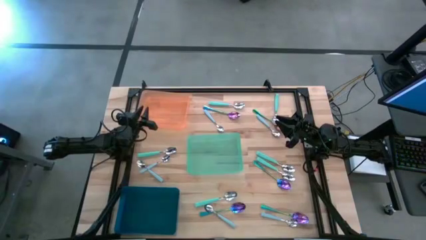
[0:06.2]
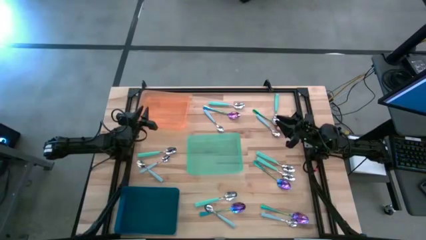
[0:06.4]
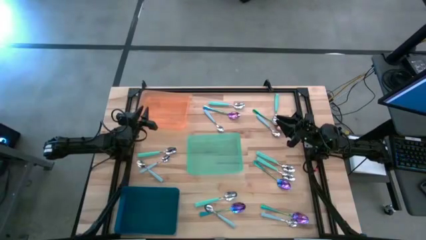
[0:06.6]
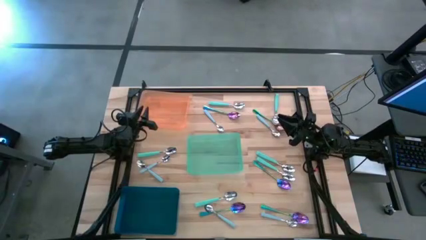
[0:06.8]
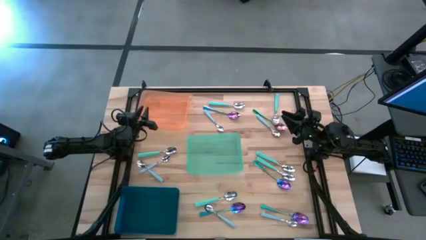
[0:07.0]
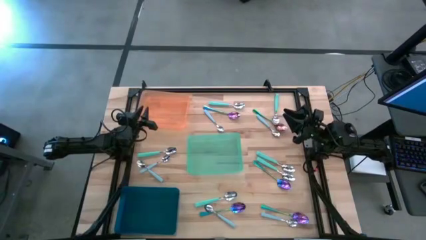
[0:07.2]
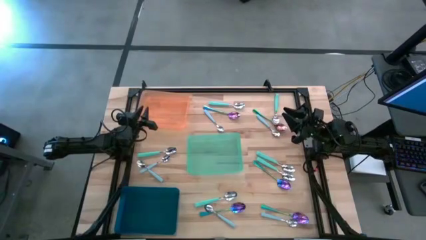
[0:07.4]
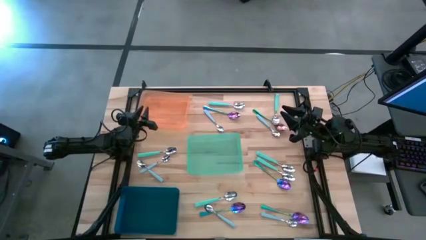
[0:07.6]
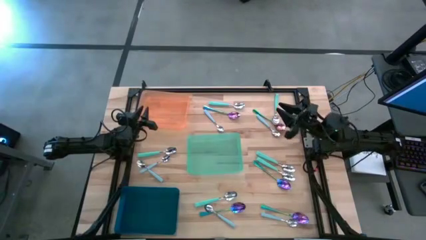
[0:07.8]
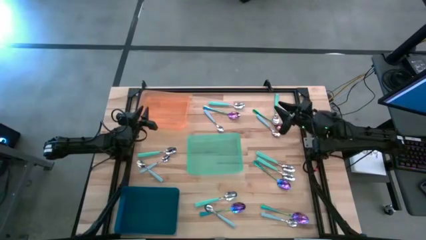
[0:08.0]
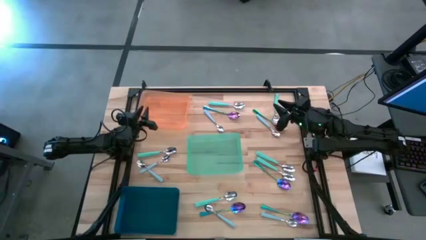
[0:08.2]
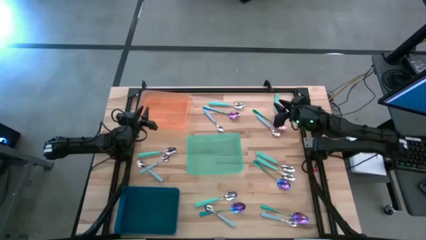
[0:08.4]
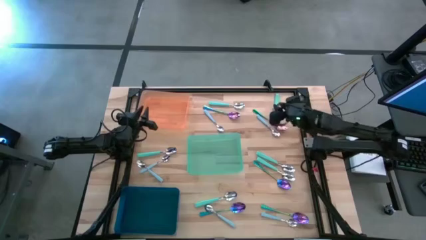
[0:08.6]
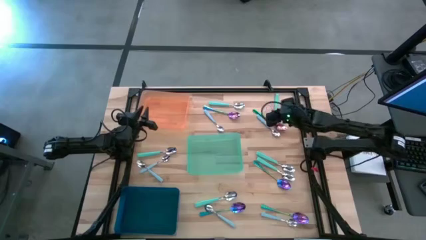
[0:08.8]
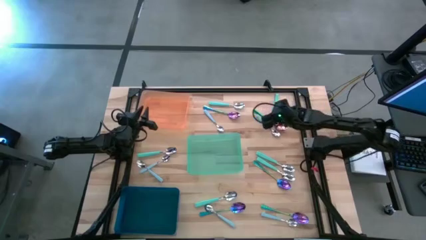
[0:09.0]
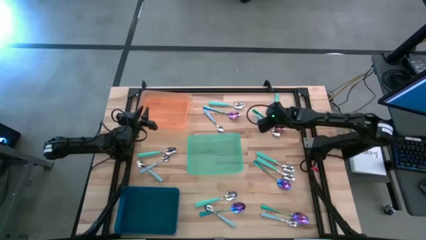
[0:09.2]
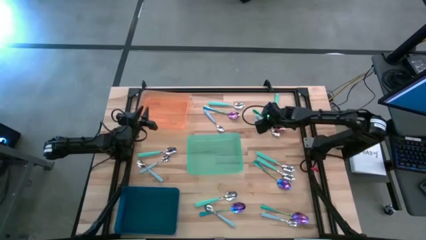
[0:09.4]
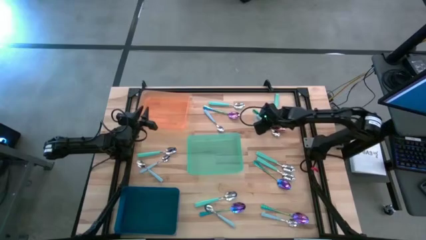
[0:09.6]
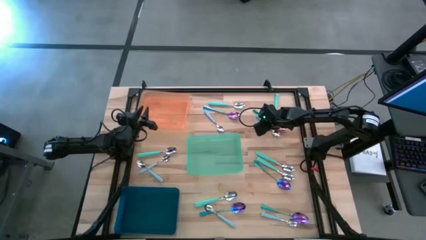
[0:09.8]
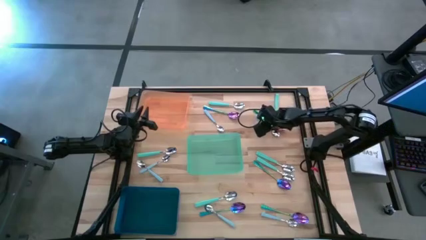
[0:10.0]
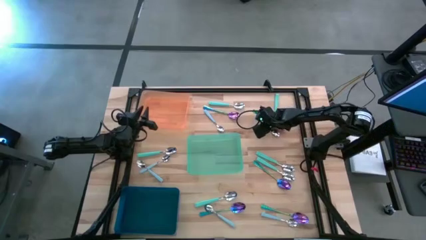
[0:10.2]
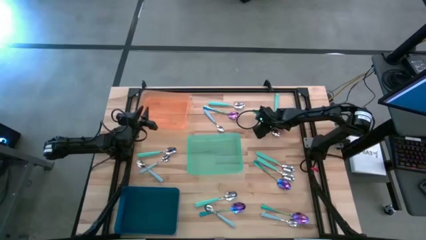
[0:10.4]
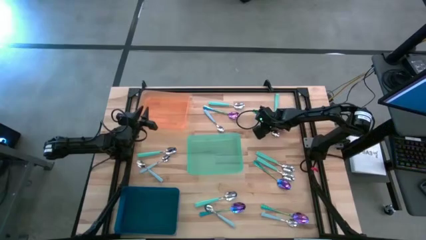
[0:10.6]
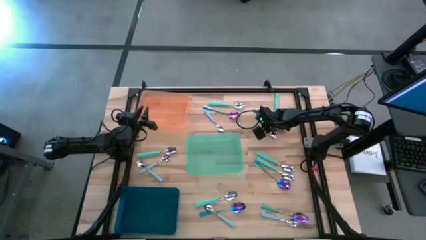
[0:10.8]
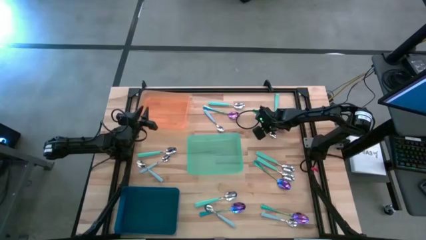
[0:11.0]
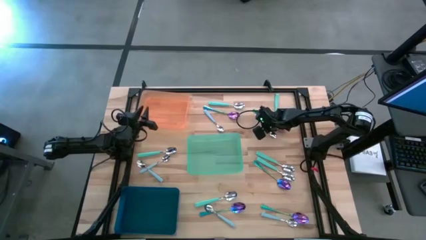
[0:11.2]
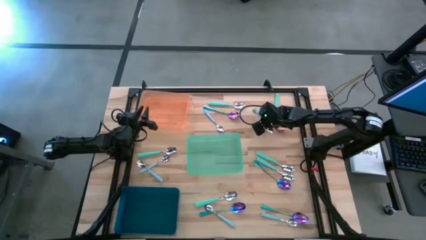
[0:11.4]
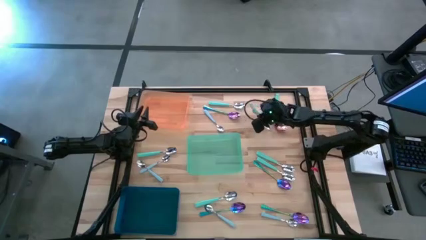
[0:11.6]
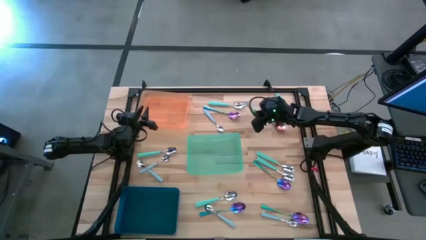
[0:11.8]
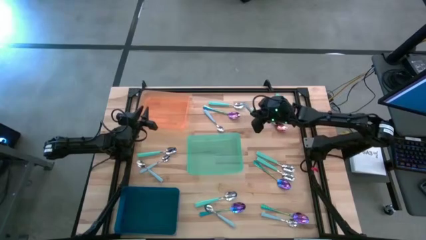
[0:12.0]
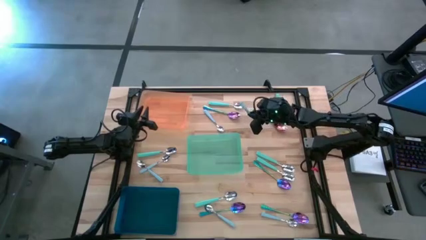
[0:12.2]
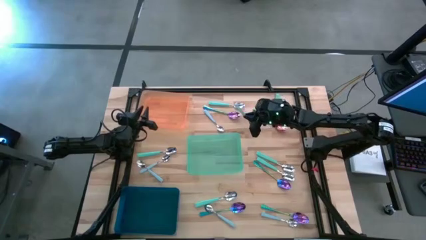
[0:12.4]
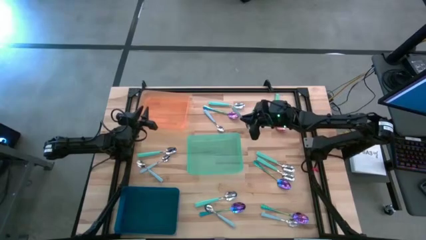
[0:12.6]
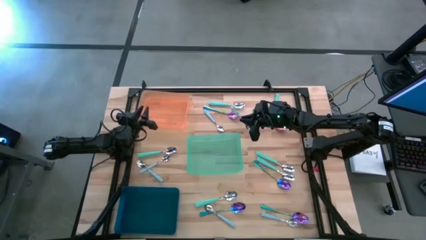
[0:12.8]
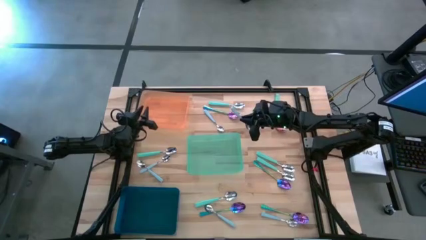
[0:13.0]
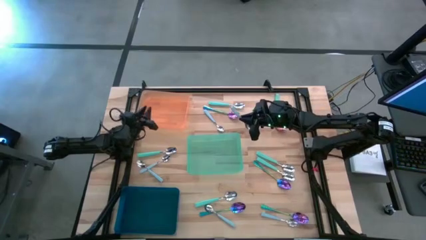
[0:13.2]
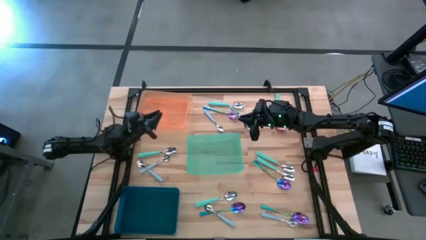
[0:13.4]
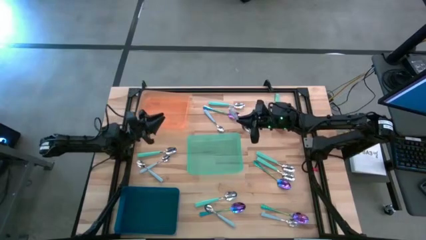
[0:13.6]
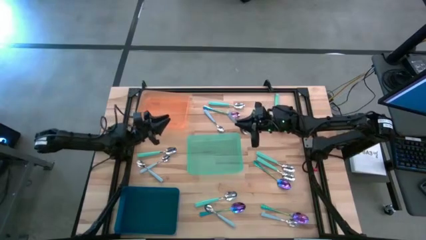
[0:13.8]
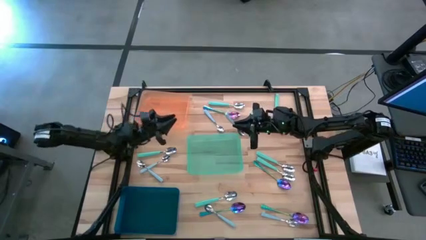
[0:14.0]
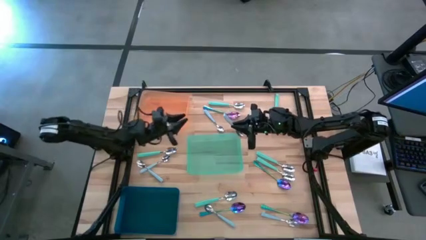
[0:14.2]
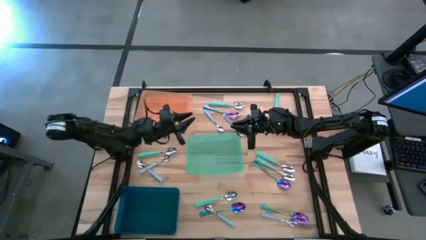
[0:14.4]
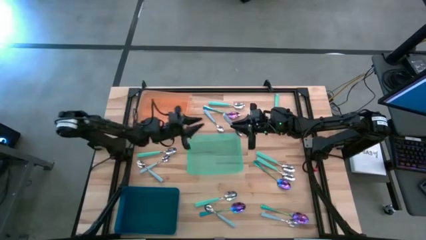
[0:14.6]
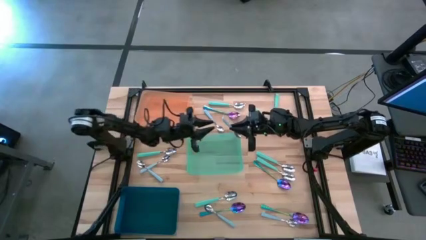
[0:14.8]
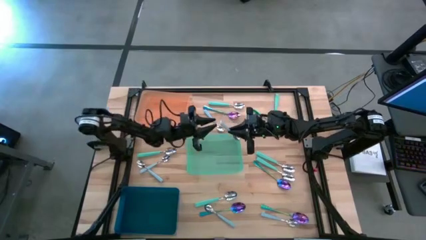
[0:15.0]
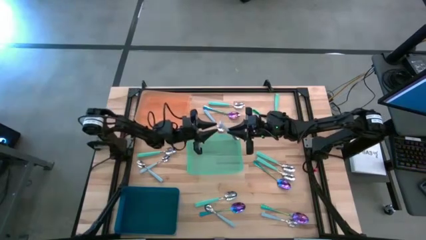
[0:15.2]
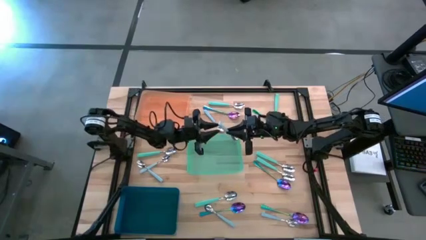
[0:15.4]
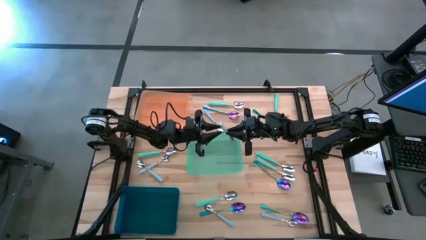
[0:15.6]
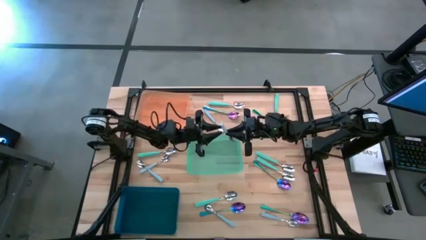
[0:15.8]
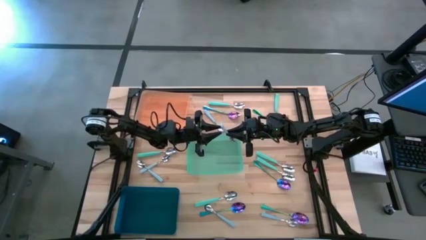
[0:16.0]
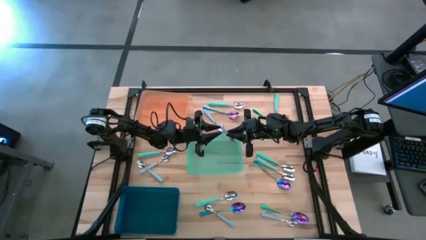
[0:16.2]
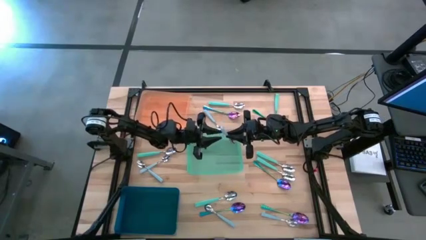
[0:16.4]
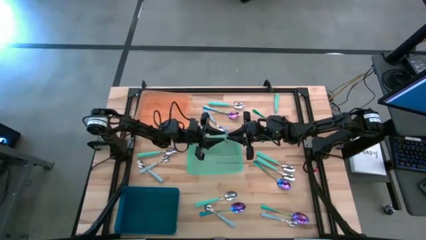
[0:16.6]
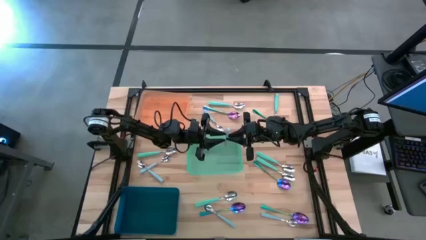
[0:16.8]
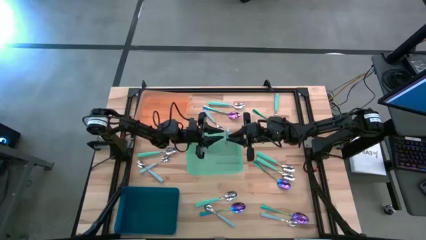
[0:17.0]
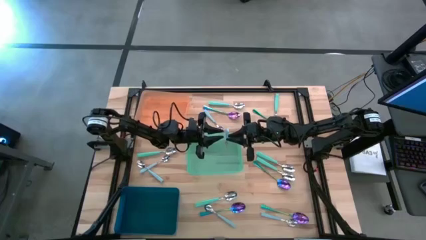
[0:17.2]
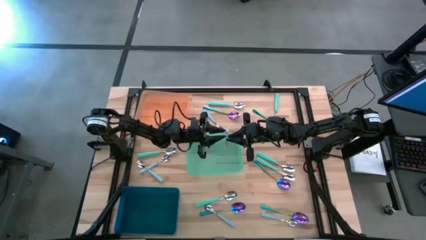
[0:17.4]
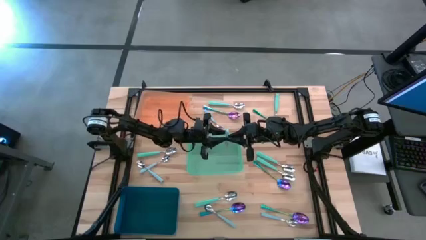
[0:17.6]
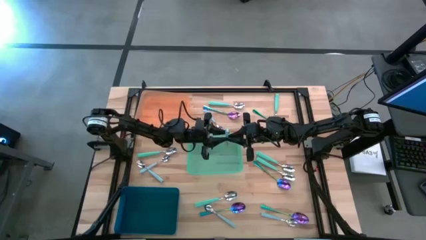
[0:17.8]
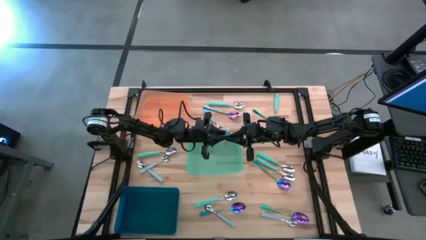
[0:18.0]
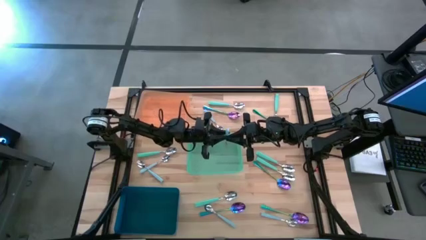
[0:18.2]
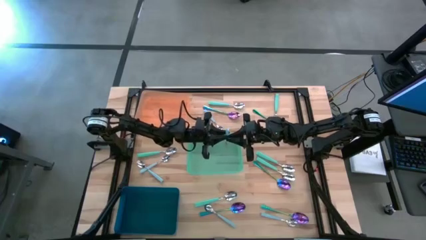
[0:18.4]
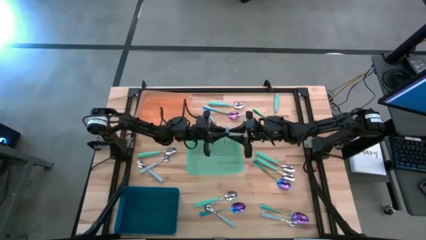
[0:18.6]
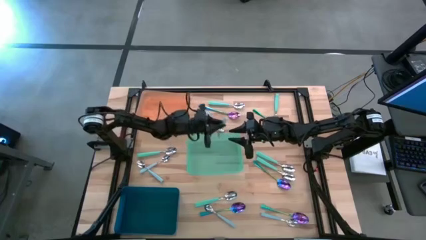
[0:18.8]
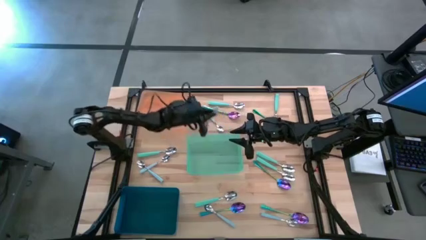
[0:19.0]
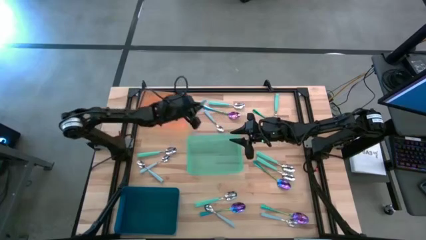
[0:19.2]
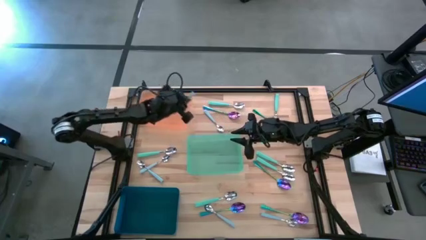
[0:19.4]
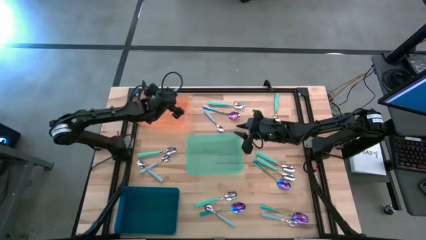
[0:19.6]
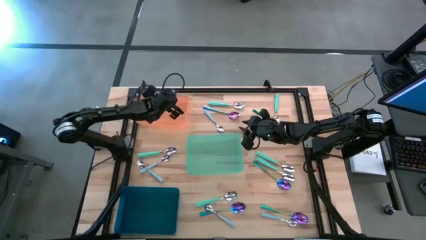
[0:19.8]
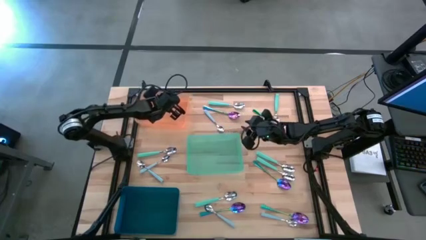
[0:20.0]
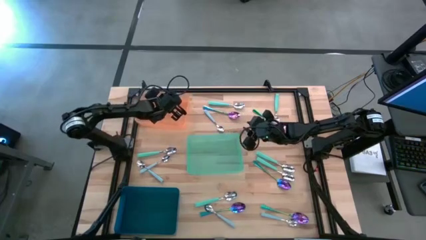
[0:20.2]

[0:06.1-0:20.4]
Task: Sort silverware by color (type)
Put the blue spoon into the orange bin
